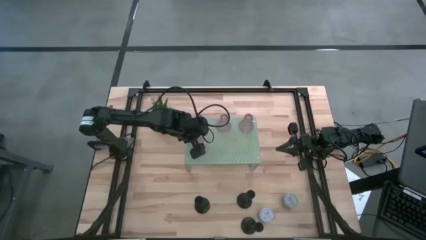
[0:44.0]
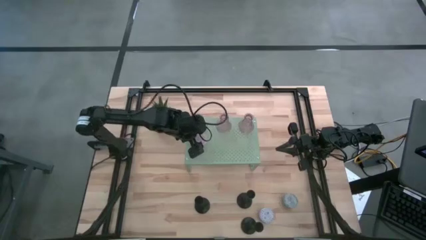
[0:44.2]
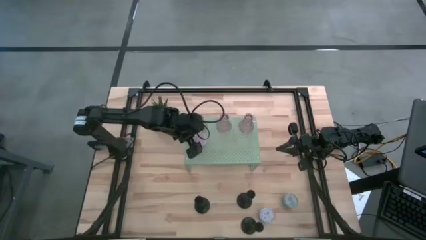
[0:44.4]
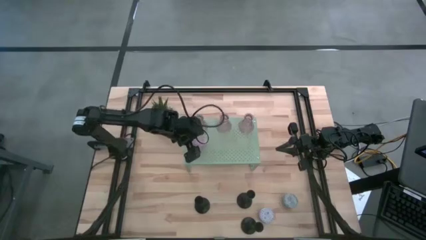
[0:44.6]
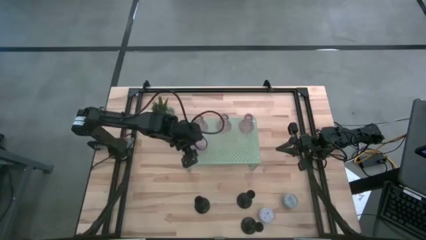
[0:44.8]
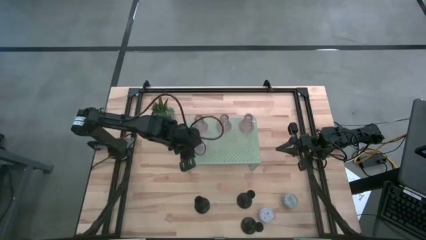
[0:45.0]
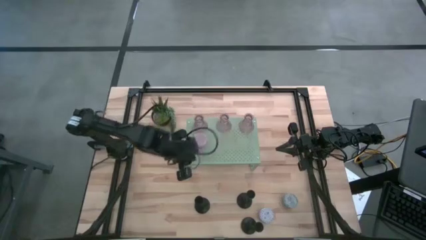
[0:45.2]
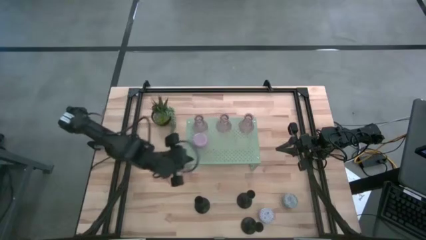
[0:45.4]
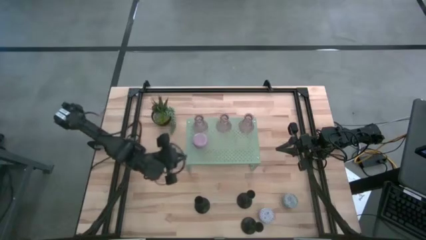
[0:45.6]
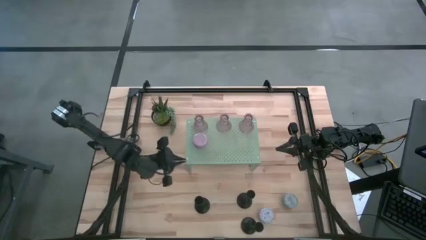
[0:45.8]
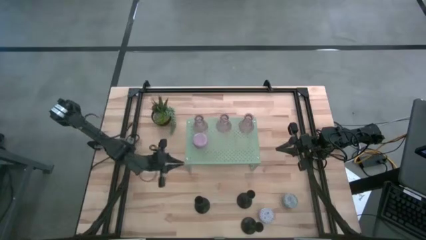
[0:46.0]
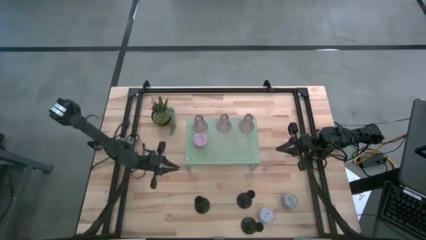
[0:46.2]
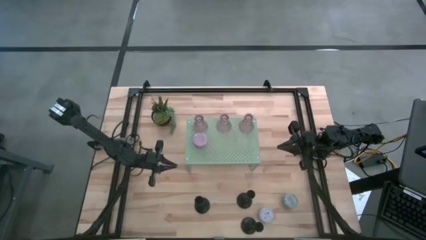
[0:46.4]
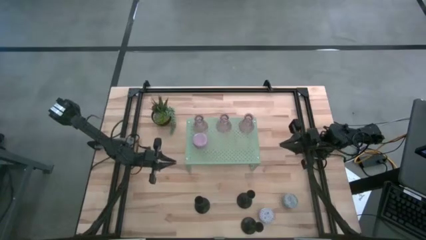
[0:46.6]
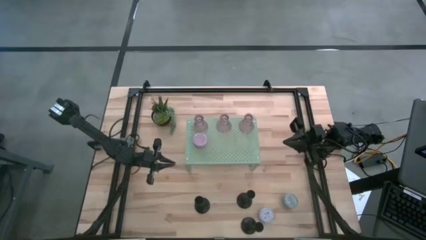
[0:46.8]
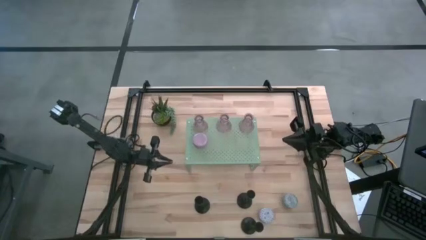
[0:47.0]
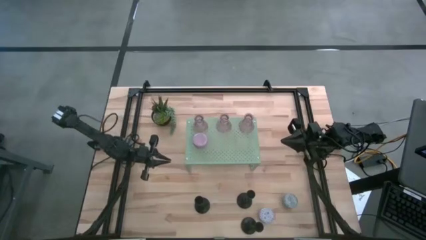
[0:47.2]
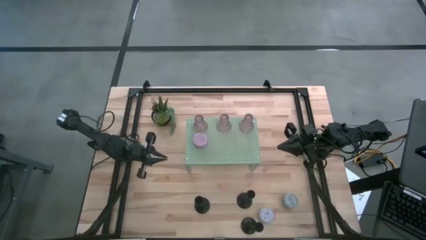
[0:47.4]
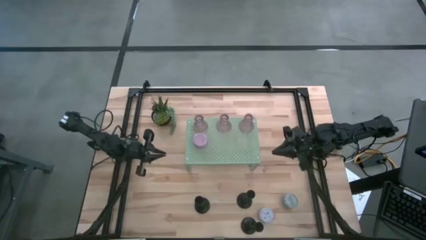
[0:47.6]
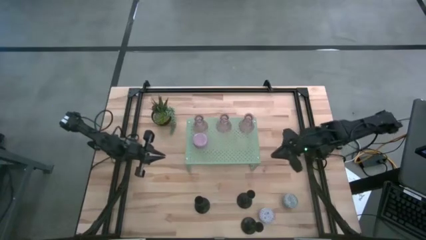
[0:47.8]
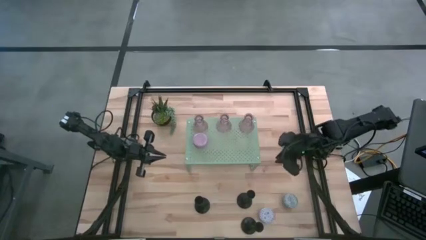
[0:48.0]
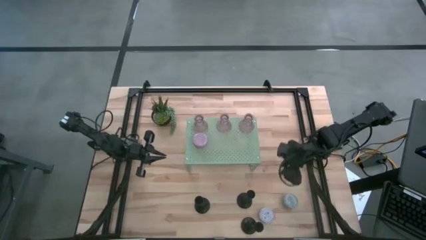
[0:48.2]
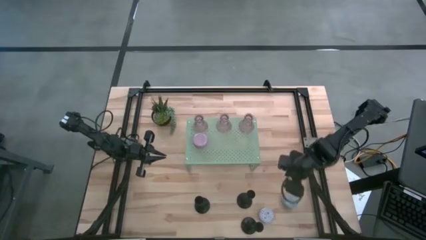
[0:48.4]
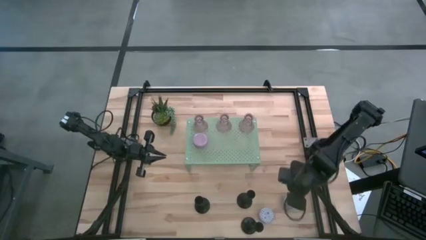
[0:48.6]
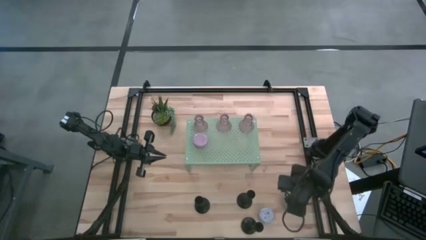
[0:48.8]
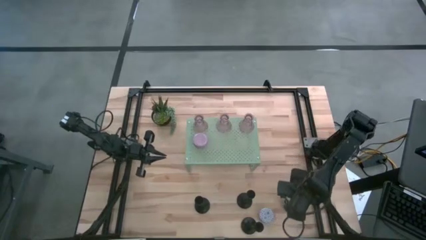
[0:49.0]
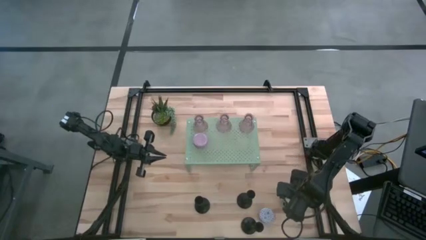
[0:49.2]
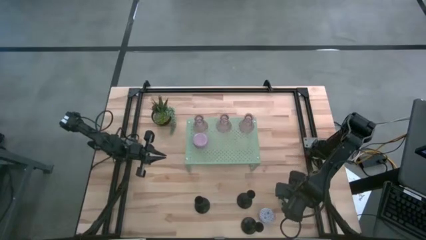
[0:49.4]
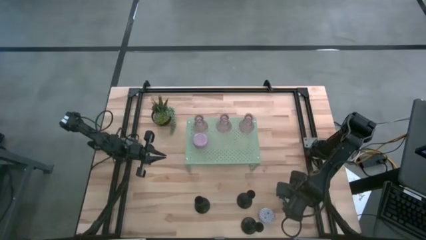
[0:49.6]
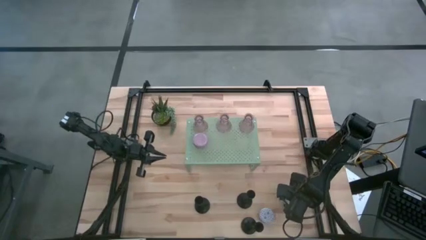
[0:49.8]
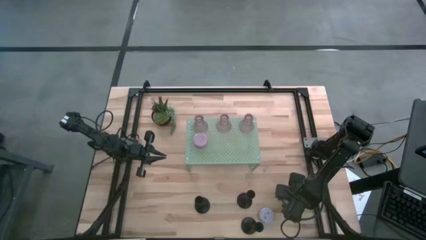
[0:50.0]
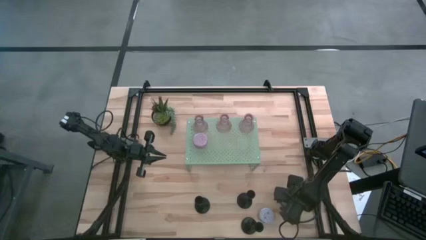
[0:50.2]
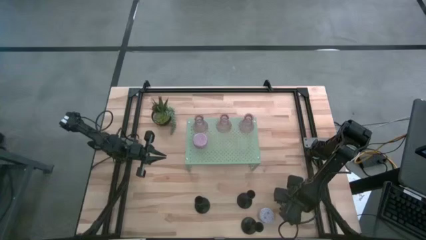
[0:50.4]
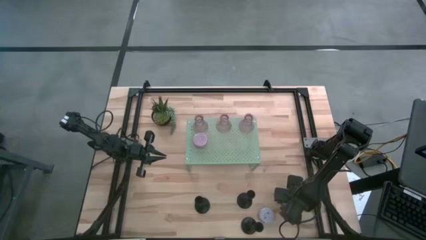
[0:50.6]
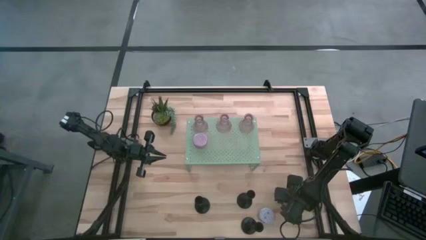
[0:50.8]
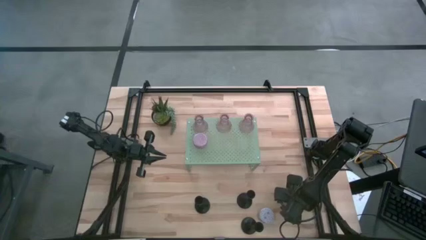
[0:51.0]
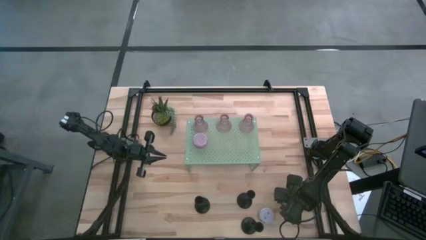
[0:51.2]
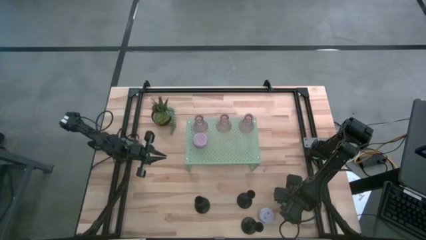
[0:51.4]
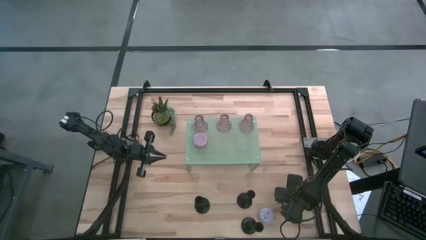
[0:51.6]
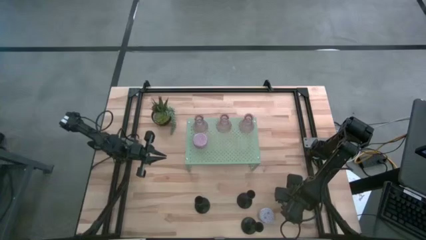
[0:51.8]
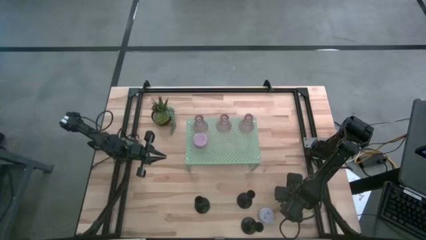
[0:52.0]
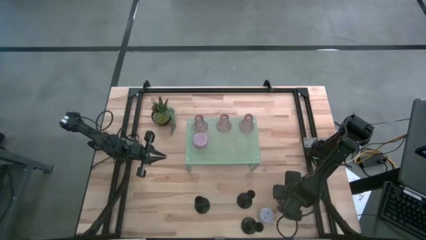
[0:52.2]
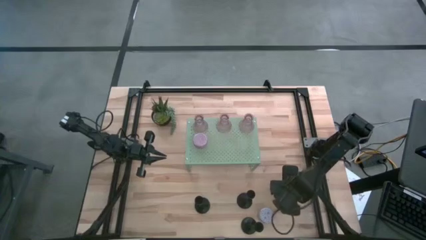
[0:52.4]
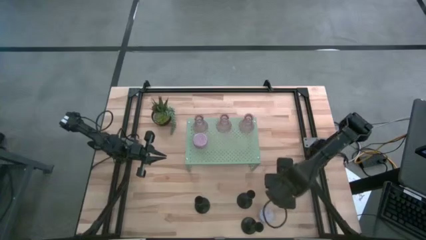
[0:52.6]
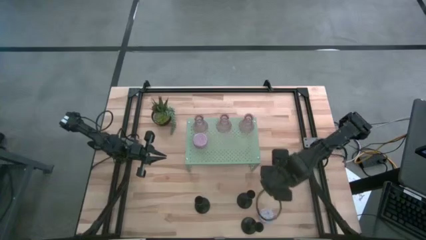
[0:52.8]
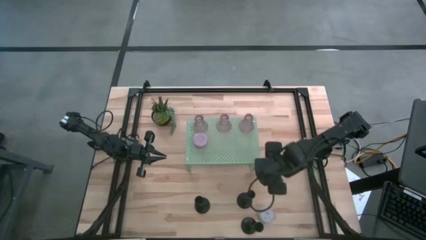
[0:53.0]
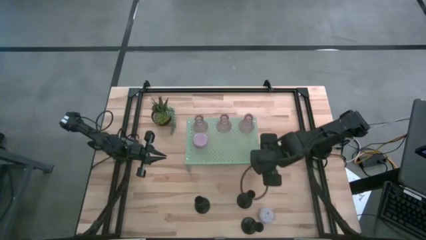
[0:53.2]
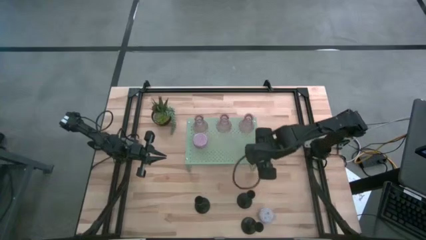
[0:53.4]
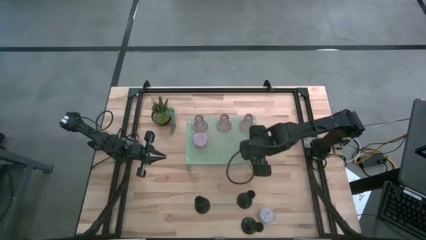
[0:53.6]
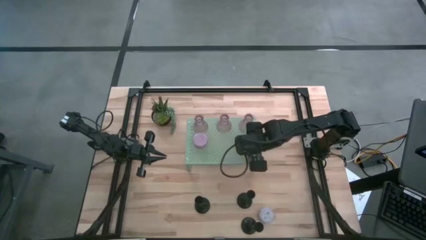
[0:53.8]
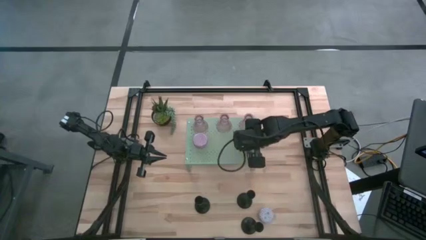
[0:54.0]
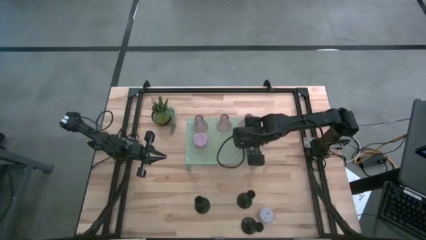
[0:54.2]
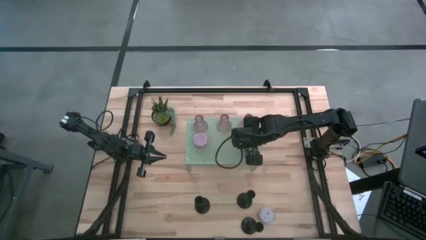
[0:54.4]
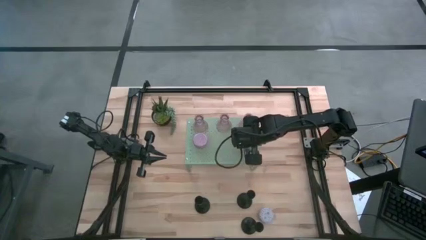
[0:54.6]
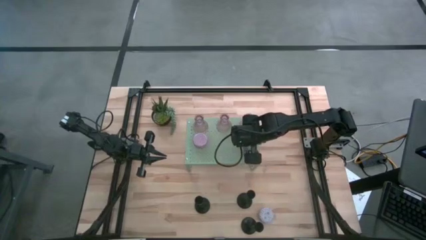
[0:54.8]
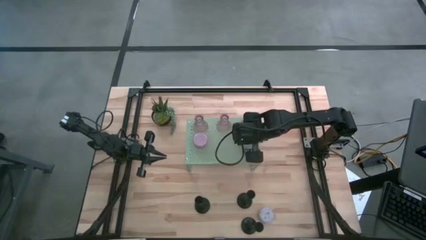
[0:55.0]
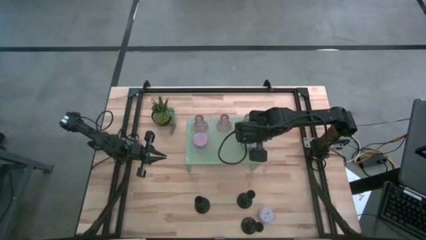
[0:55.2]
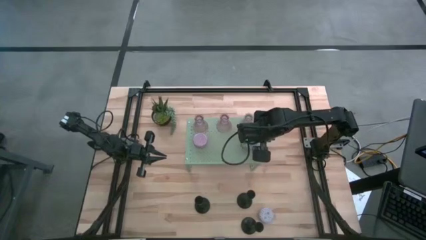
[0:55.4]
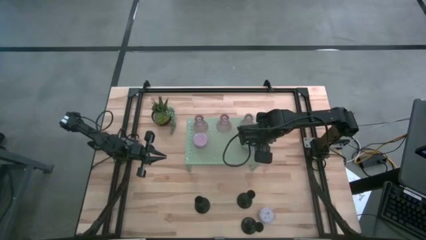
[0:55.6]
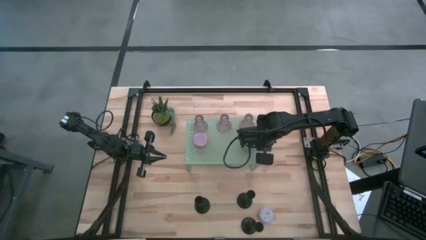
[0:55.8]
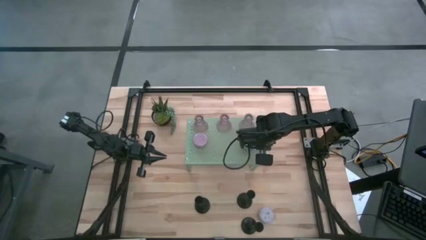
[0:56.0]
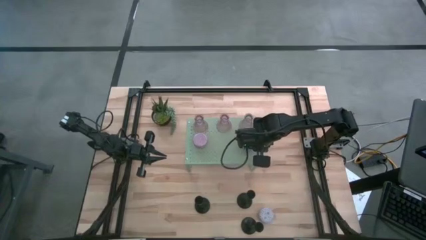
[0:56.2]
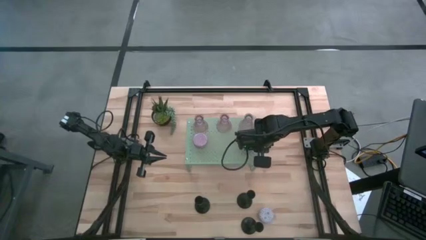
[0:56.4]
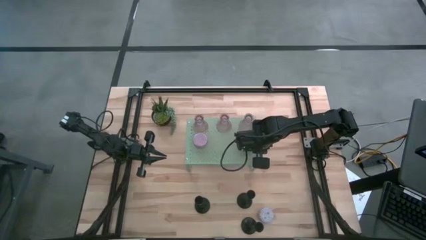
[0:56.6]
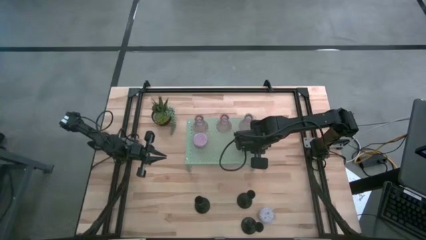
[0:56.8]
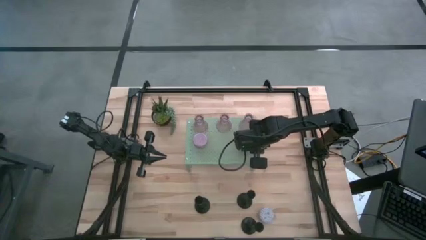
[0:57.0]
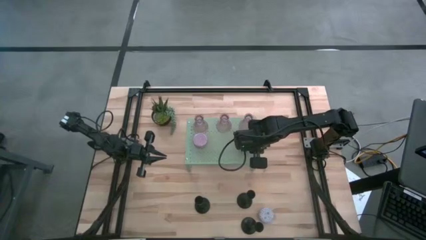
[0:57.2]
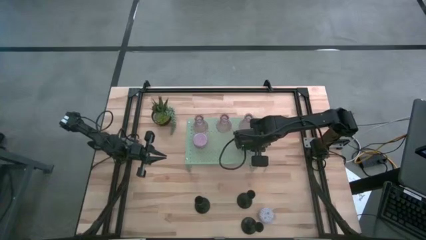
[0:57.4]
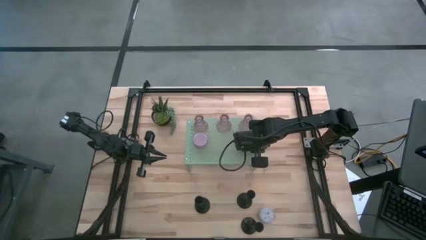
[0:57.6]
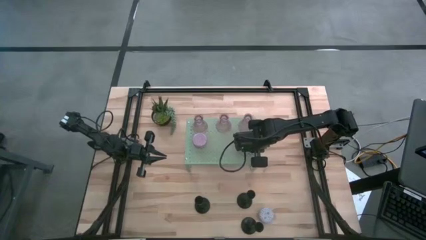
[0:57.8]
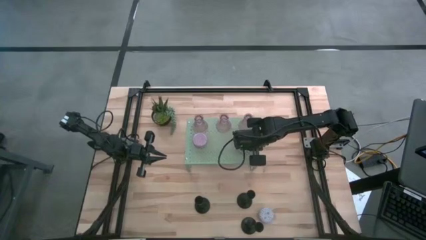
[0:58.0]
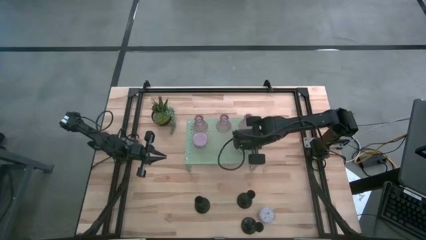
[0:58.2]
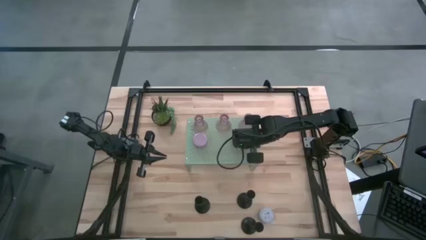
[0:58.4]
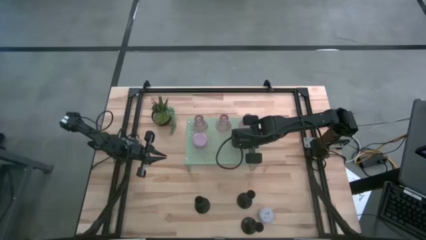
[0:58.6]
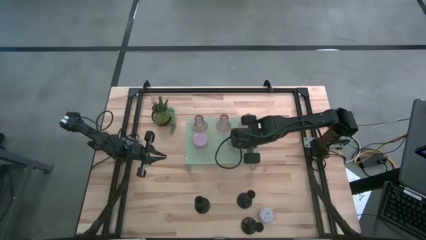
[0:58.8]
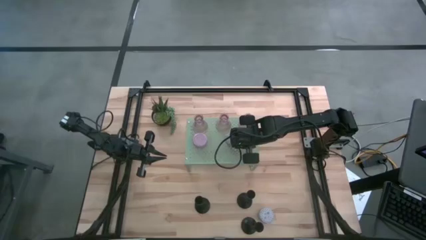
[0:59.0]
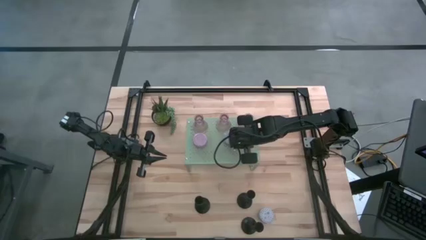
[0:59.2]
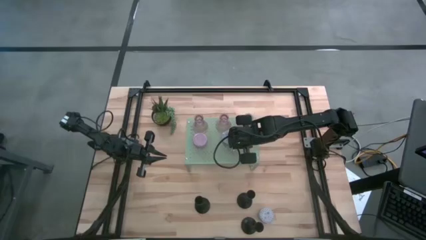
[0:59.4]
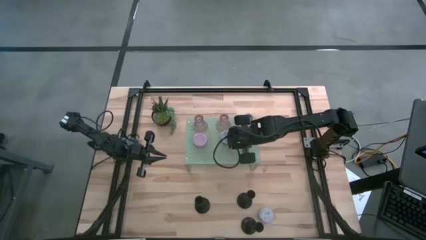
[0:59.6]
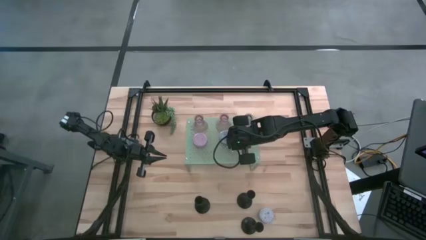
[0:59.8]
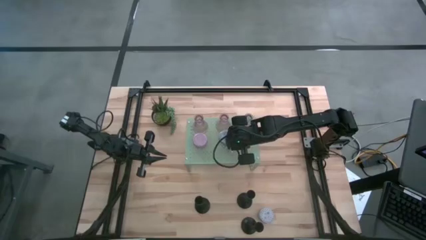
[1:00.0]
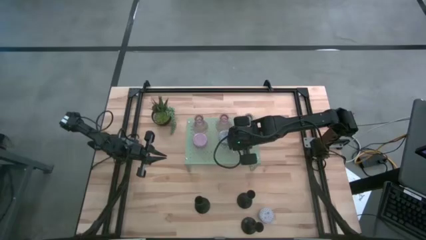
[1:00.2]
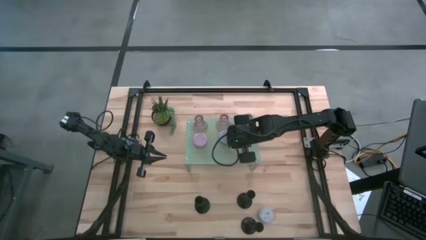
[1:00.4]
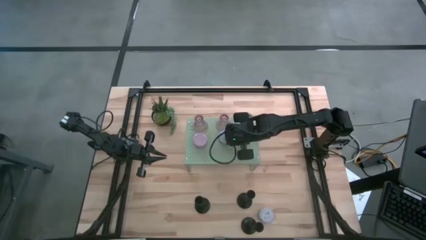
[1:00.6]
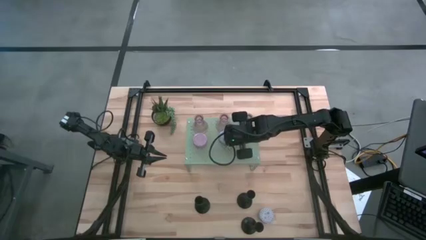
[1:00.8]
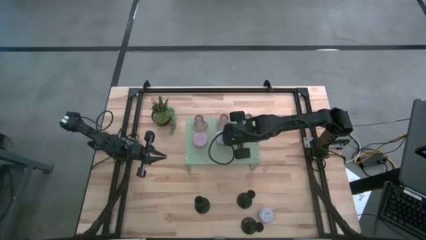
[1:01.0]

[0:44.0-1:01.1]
Task: Pick & Place candle stick holders
Put the green scented candle on the shelf
